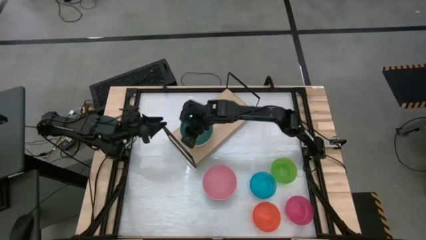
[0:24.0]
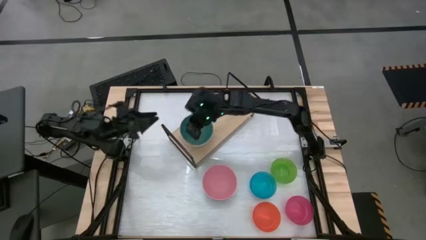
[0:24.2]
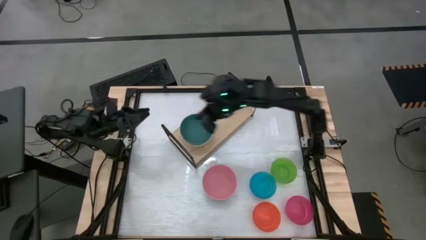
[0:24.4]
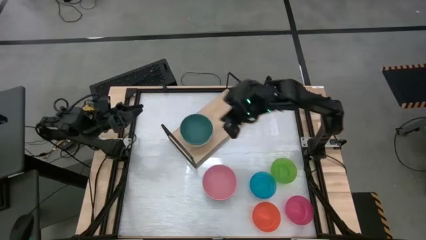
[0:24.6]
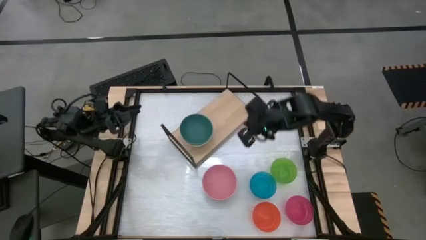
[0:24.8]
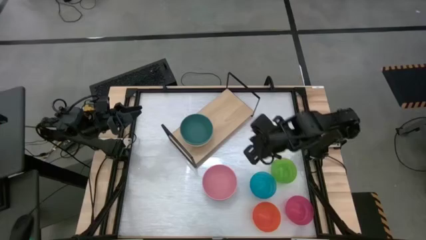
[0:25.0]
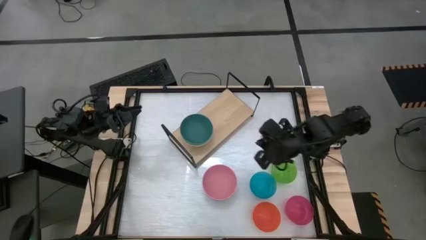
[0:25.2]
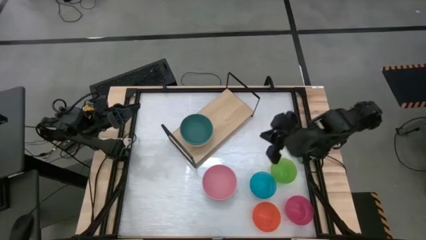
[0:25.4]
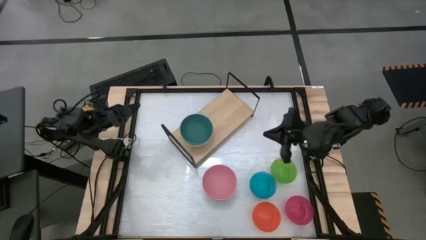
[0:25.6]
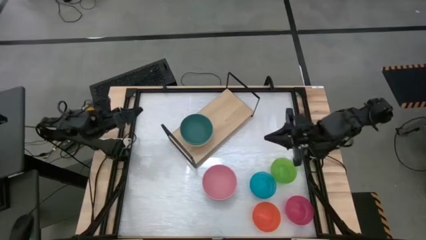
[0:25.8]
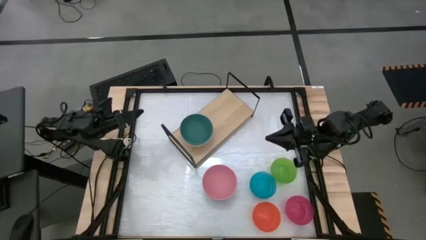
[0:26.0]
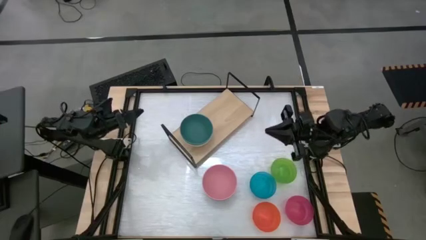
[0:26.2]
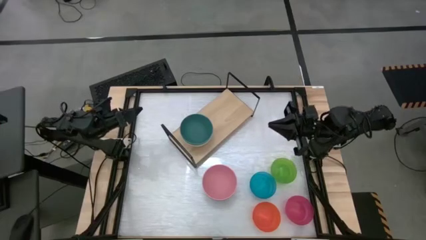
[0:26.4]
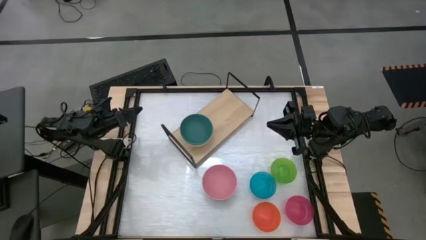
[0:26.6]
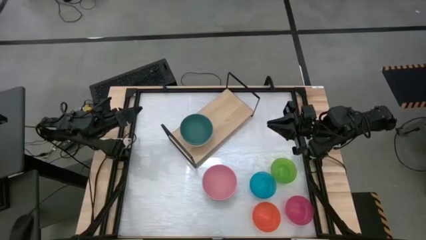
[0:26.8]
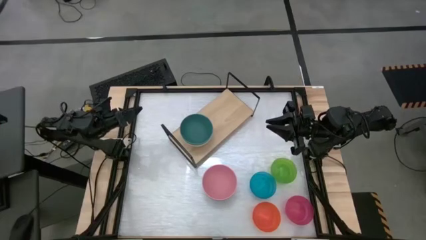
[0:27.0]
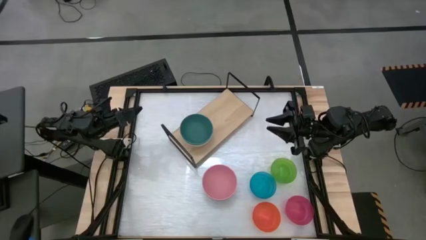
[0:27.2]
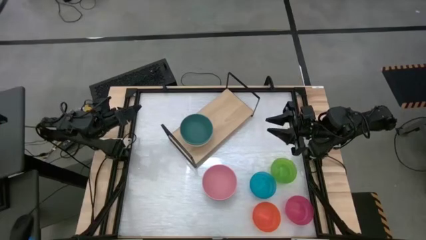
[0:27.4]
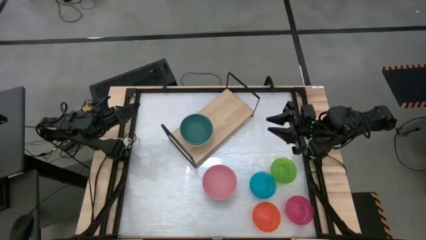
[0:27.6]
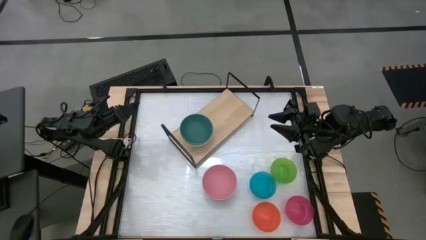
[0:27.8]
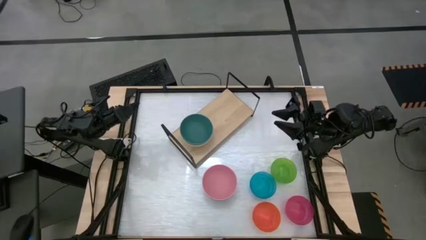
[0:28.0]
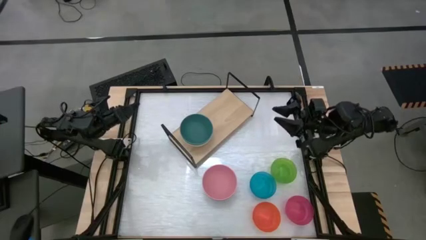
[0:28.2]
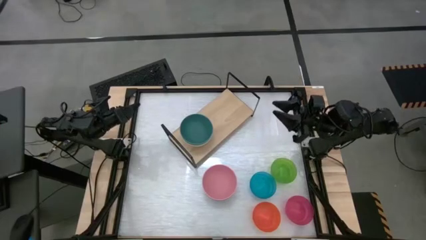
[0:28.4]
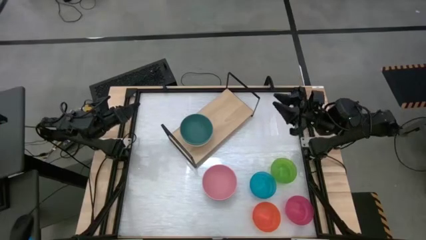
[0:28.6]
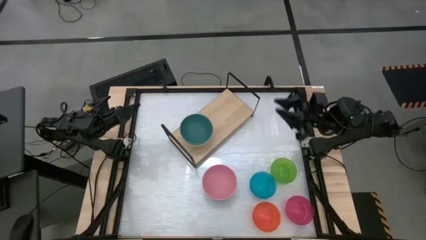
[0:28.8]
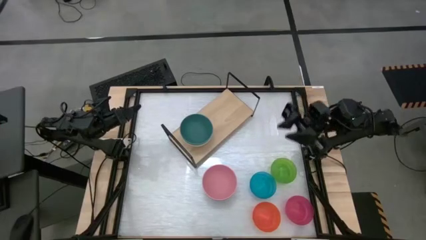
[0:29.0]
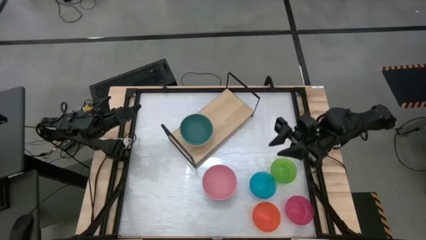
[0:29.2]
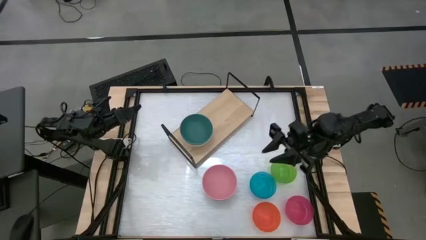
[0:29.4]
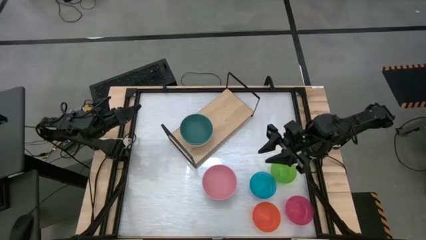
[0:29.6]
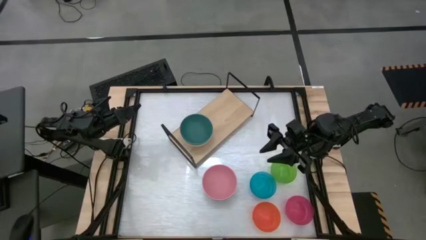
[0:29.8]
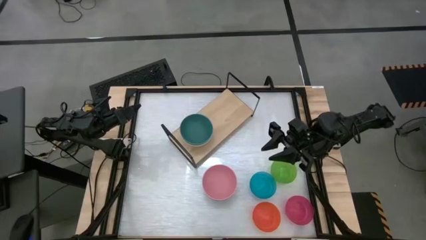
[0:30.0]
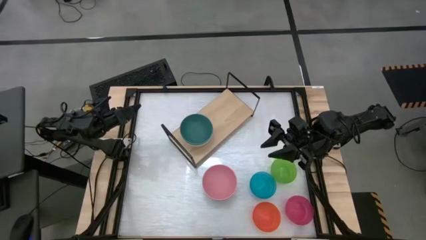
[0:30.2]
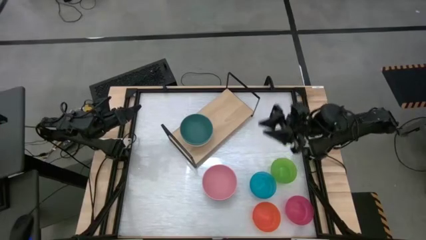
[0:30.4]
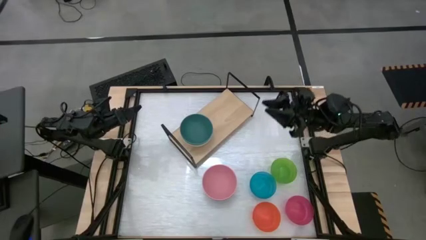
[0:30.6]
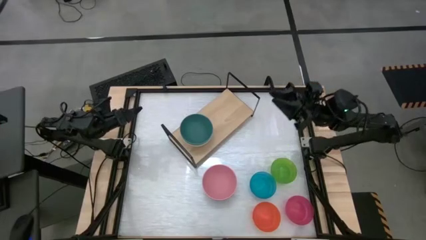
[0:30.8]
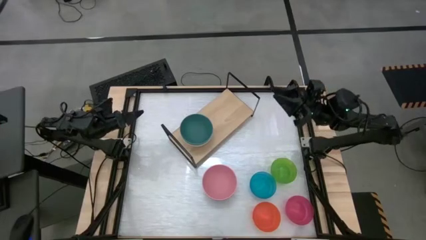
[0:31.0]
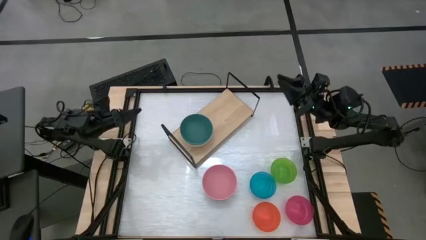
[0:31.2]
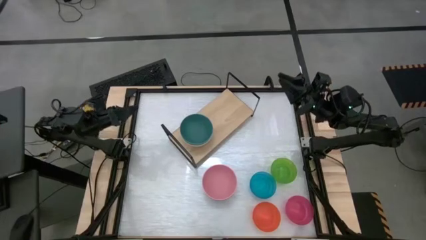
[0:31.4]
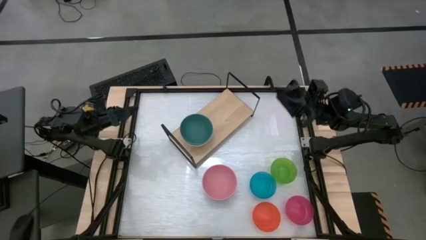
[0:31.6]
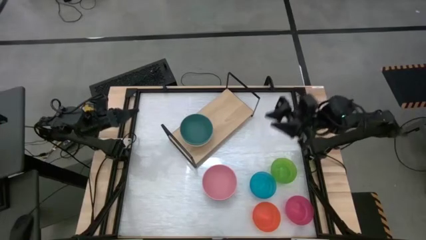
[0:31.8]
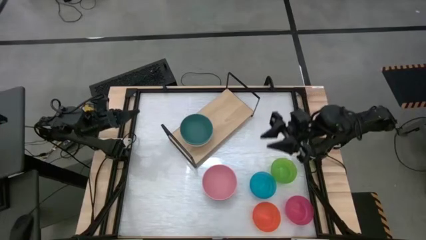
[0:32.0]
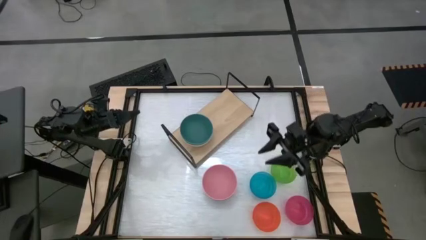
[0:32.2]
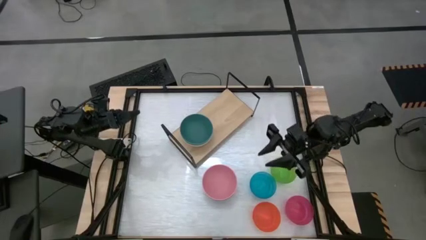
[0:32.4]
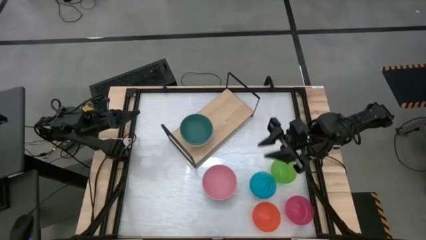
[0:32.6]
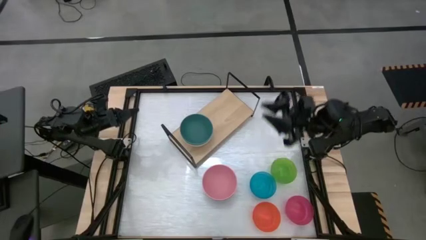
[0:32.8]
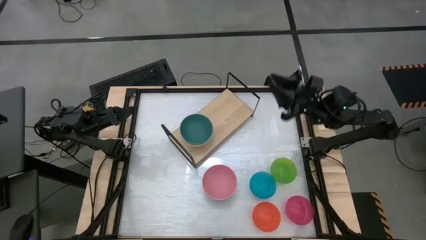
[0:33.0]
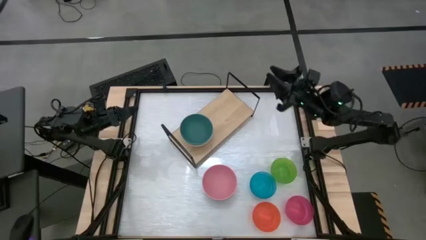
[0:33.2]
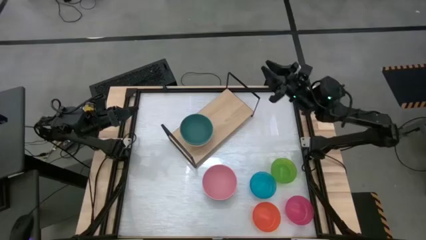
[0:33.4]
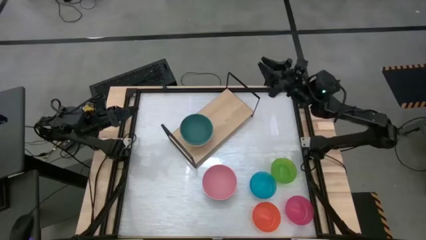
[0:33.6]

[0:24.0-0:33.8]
Task: Place and stack bowls onto a shelf
Stack the pink bowl on top of the dark green bowl on the shelf

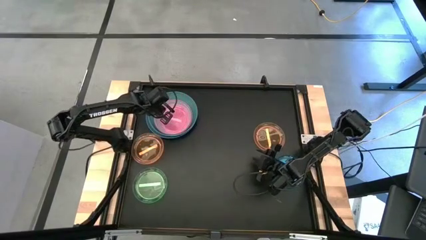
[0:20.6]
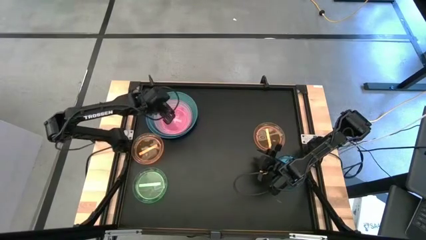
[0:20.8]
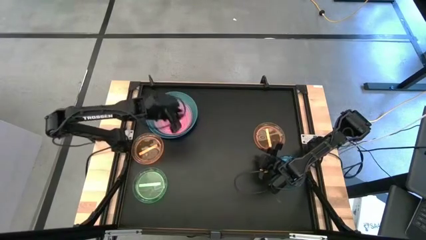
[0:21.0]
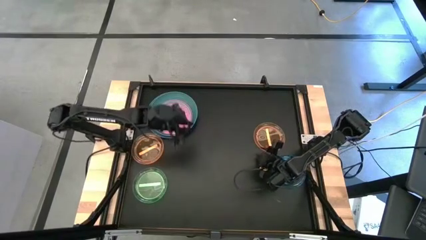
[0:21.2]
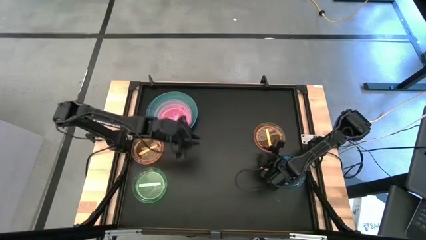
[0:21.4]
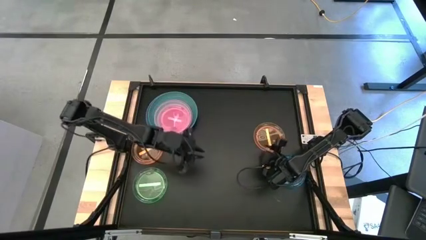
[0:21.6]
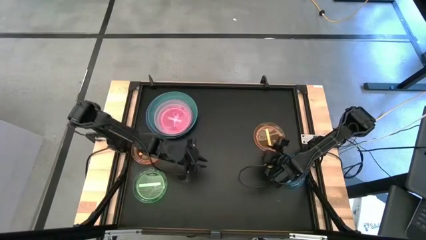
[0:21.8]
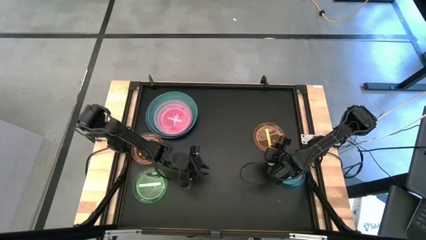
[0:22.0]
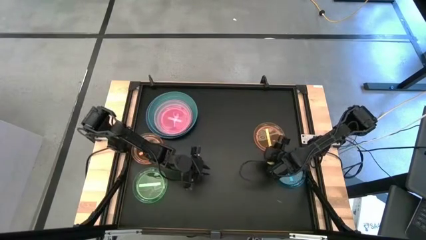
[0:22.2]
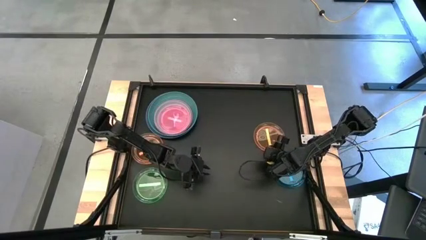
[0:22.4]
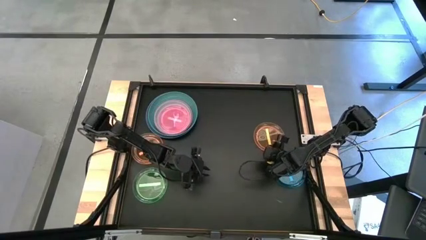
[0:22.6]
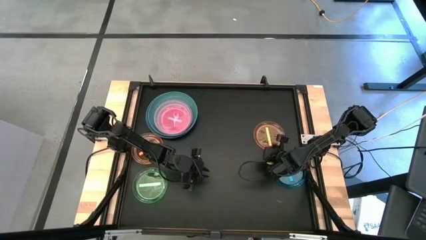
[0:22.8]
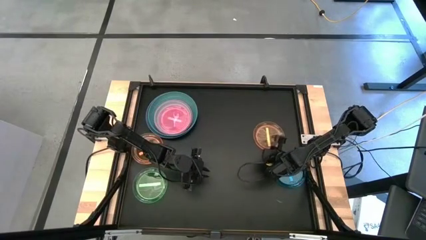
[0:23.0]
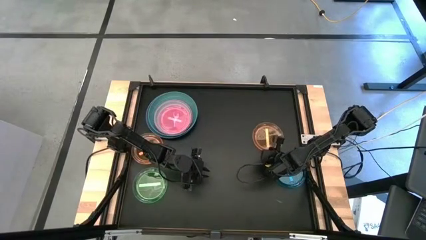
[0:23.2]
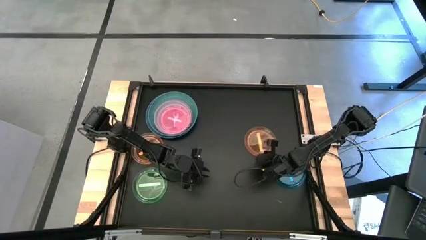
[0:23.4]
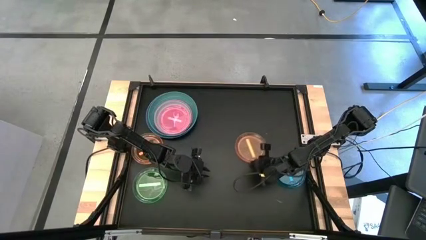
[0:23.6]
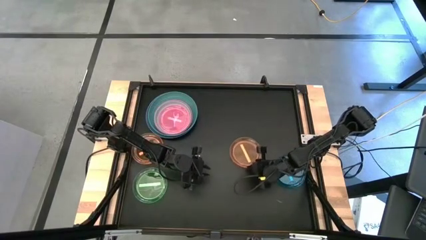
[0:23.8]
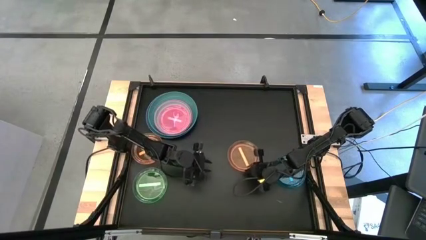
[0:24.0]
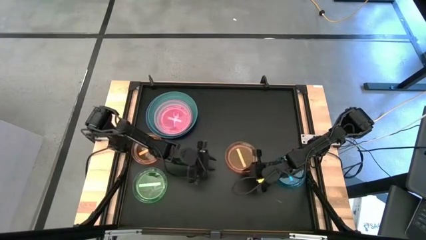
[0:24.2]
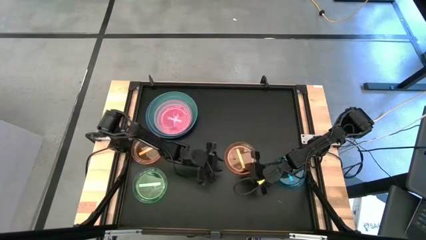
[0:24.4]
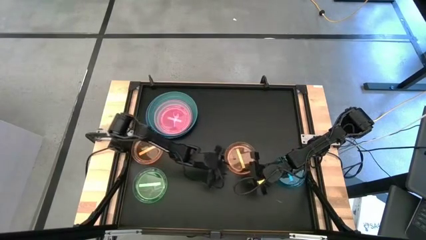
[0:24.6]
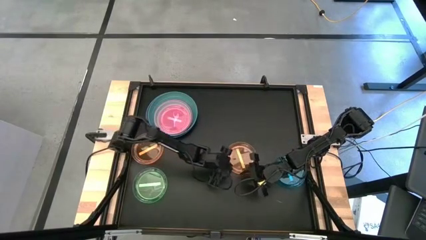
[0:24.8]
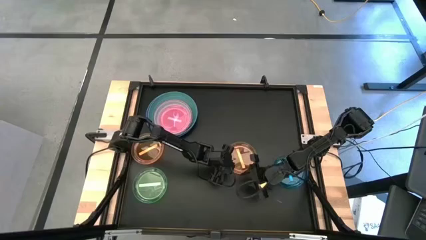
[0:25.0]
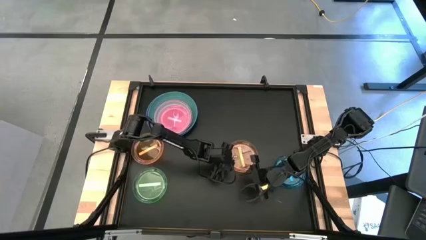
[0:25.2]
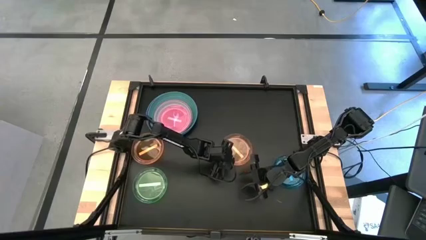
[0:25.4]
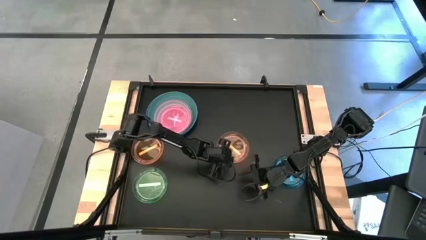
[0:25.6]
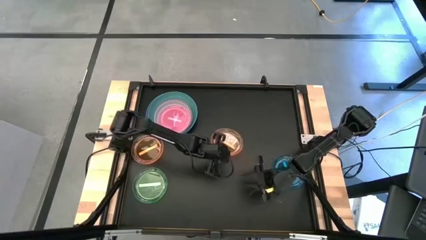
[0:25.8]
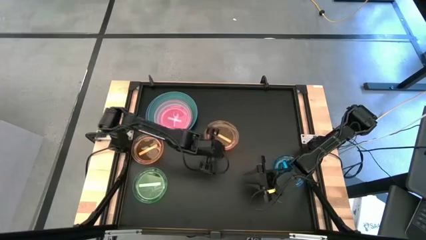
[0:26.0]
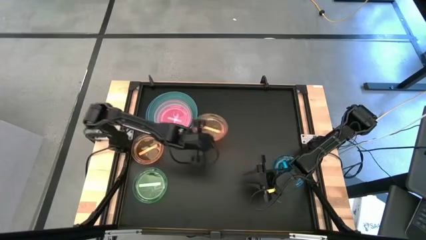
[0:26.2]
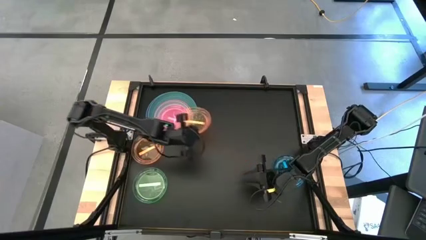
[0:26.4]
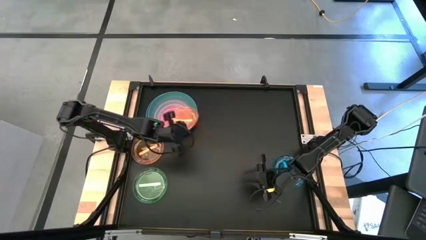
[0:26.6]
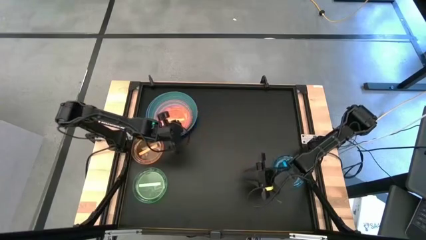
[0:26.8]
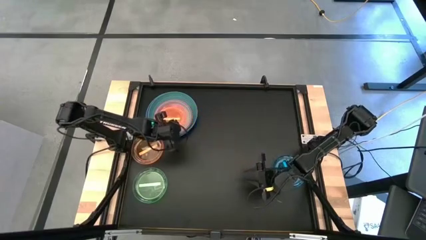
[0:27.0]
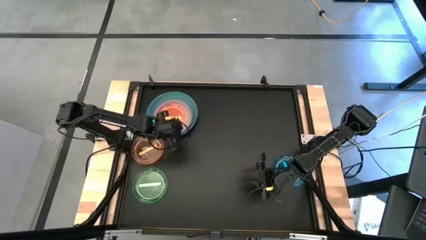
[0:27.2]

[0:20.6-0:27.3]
Task: Stack plastic plates
Stack the right orange plate on the light pink plate
